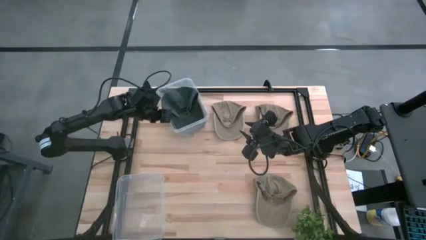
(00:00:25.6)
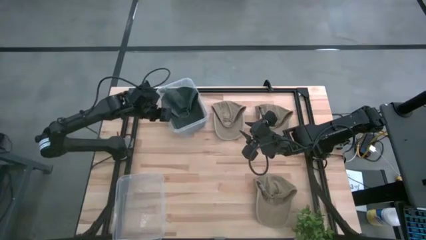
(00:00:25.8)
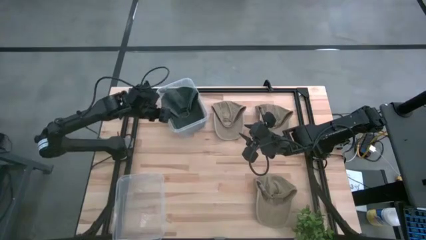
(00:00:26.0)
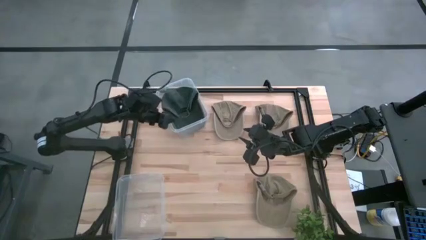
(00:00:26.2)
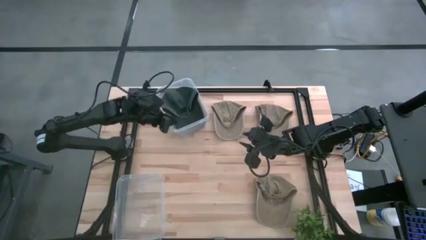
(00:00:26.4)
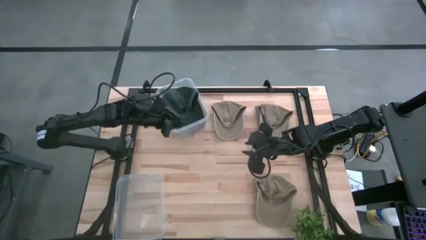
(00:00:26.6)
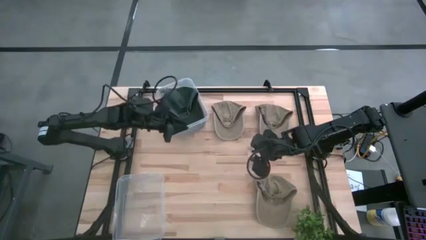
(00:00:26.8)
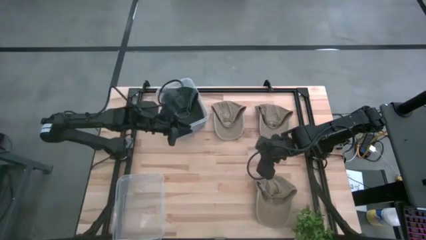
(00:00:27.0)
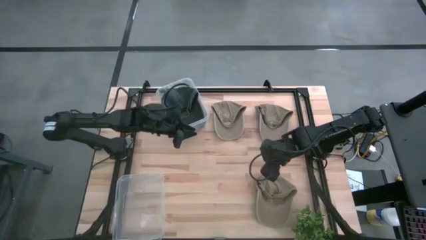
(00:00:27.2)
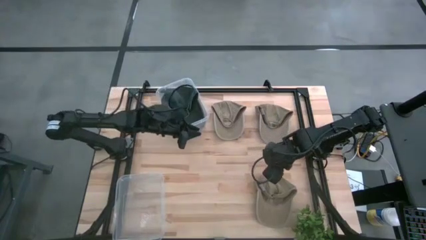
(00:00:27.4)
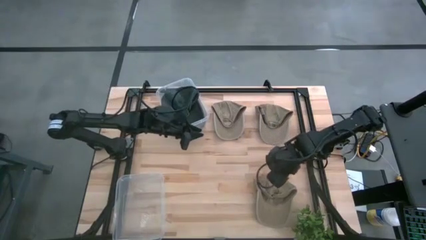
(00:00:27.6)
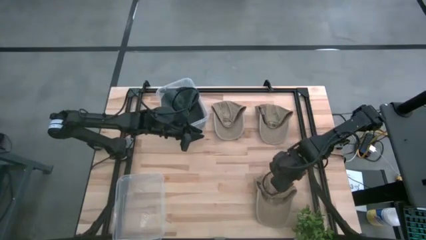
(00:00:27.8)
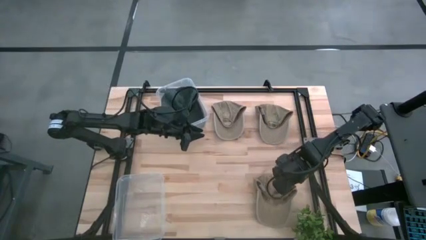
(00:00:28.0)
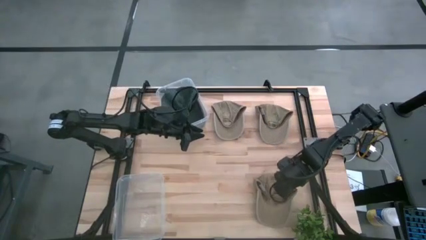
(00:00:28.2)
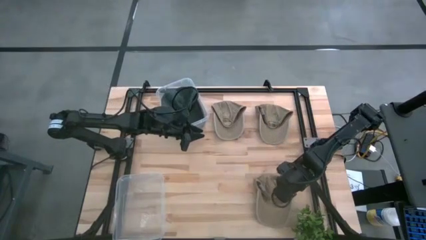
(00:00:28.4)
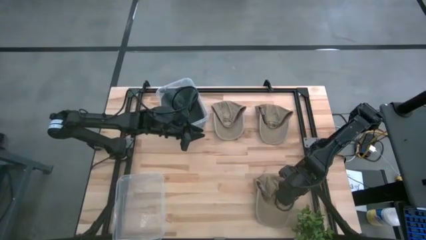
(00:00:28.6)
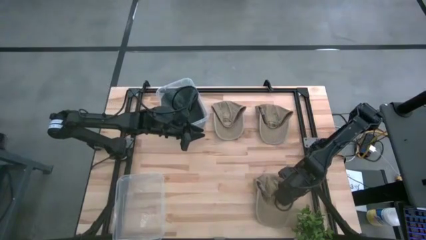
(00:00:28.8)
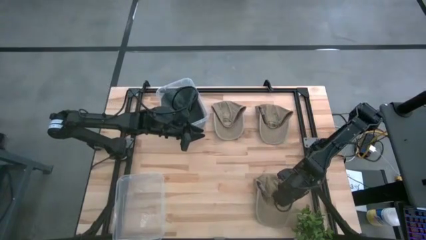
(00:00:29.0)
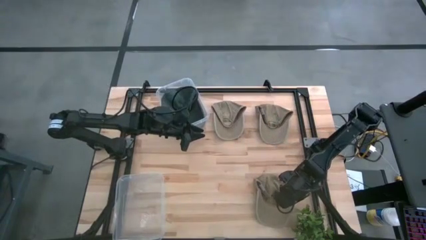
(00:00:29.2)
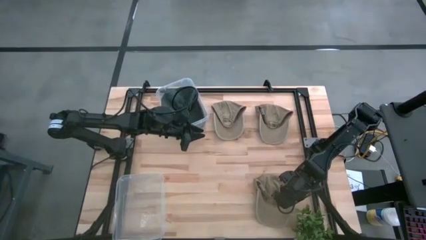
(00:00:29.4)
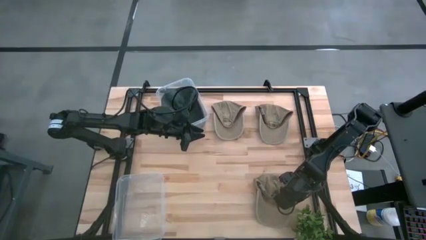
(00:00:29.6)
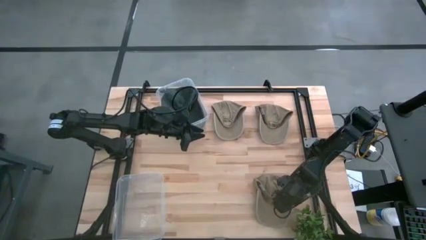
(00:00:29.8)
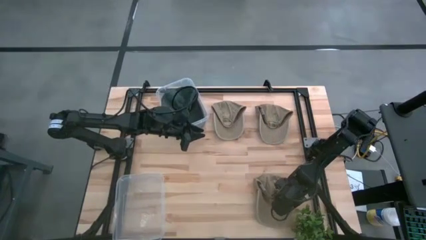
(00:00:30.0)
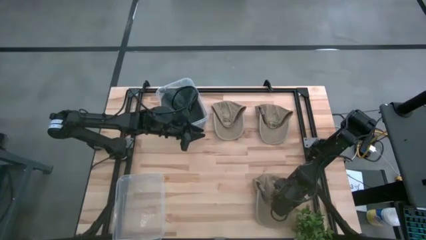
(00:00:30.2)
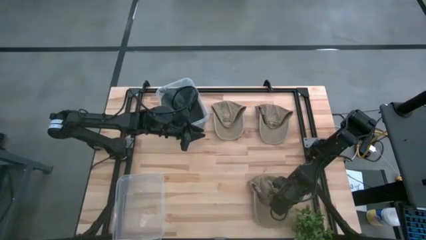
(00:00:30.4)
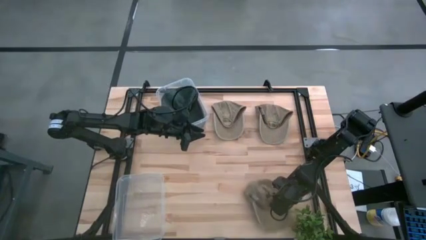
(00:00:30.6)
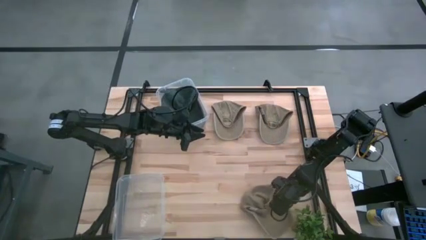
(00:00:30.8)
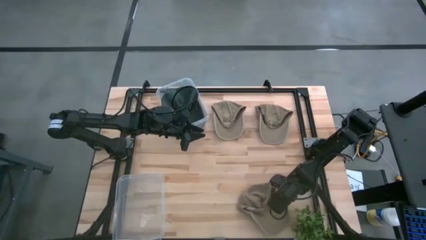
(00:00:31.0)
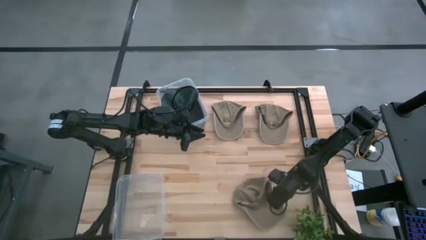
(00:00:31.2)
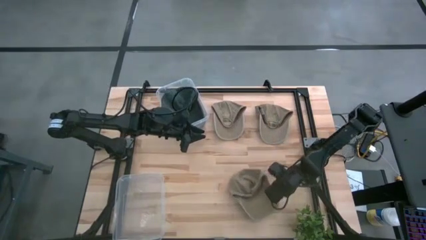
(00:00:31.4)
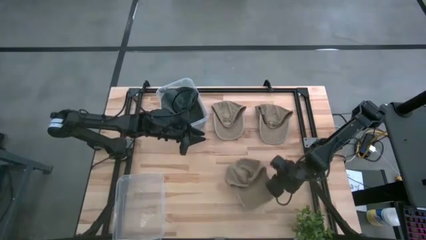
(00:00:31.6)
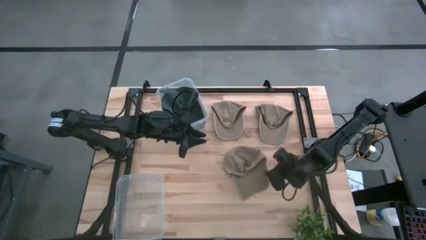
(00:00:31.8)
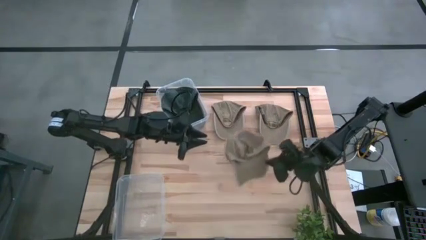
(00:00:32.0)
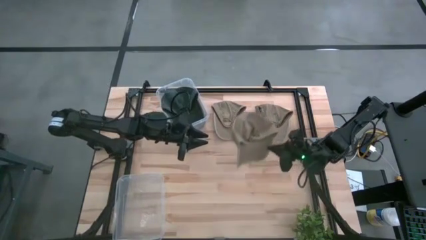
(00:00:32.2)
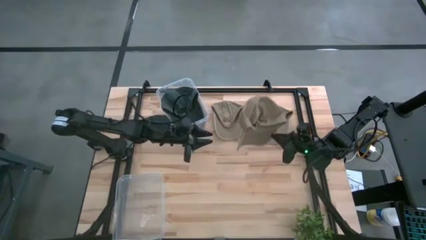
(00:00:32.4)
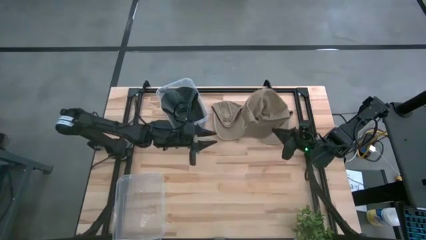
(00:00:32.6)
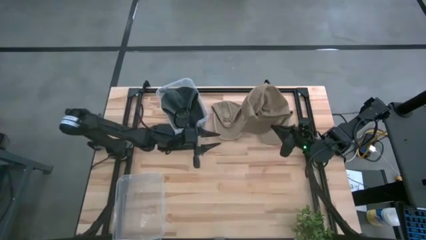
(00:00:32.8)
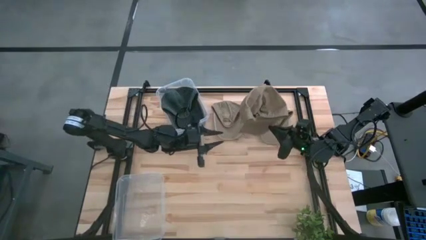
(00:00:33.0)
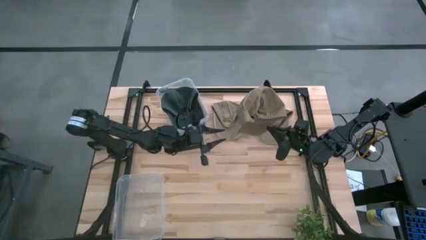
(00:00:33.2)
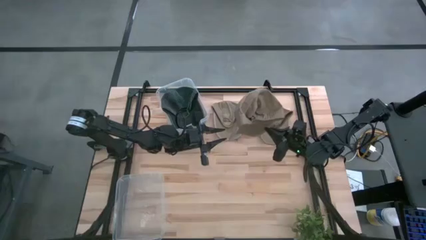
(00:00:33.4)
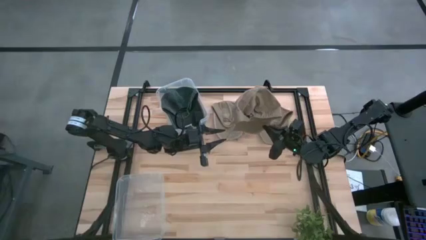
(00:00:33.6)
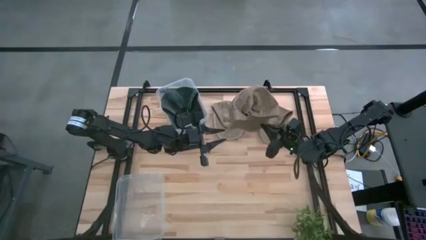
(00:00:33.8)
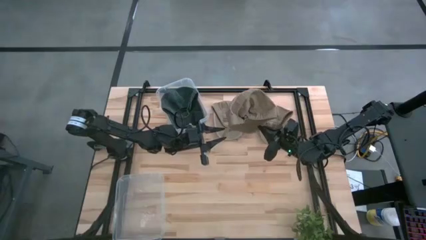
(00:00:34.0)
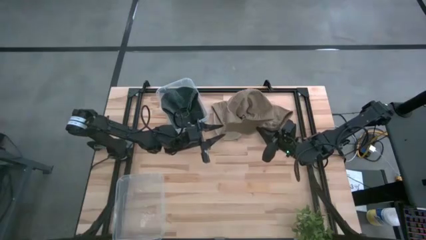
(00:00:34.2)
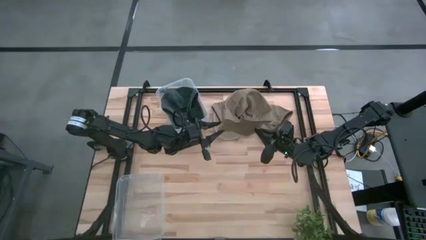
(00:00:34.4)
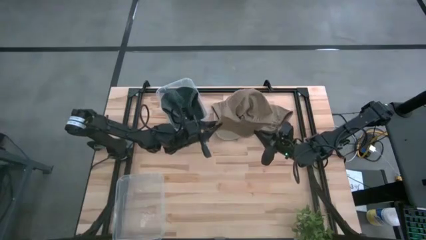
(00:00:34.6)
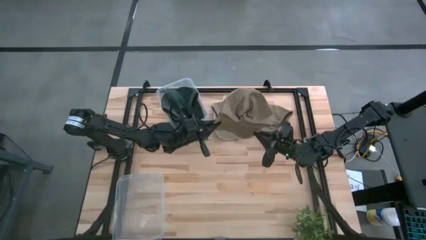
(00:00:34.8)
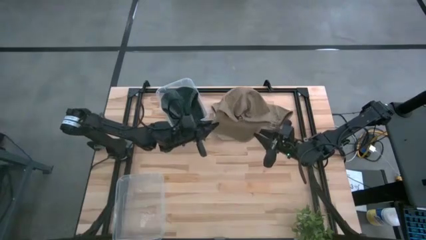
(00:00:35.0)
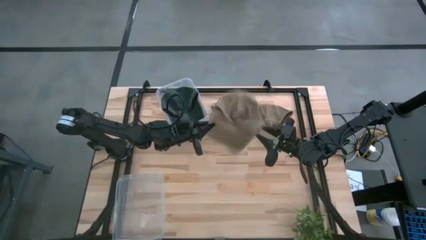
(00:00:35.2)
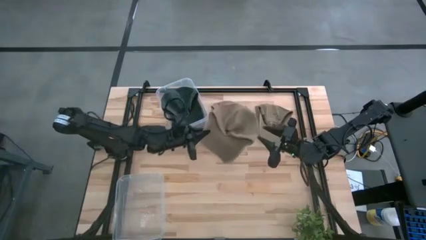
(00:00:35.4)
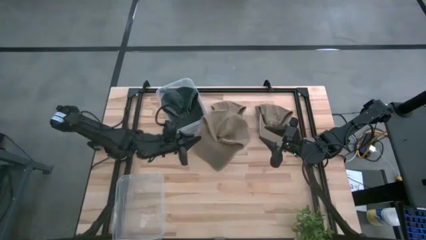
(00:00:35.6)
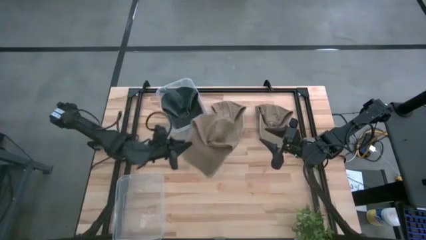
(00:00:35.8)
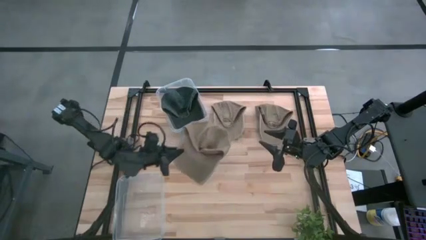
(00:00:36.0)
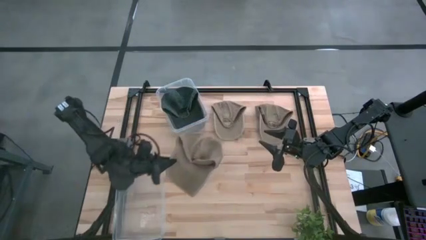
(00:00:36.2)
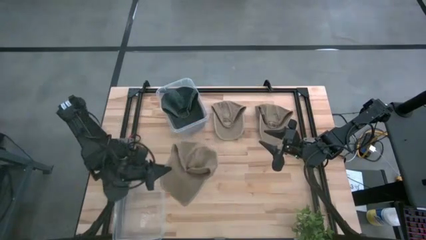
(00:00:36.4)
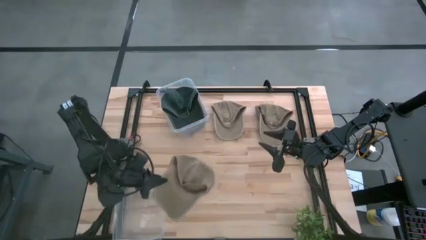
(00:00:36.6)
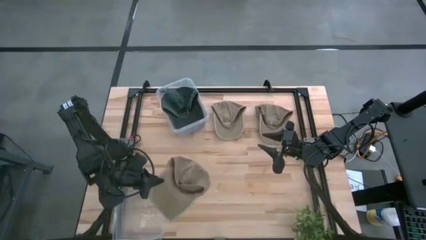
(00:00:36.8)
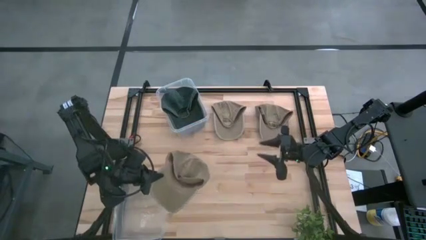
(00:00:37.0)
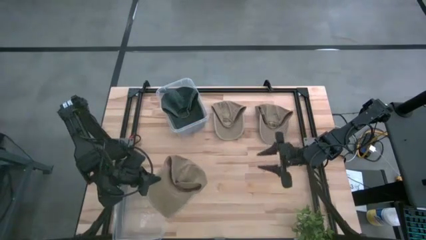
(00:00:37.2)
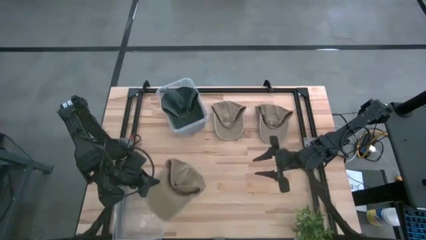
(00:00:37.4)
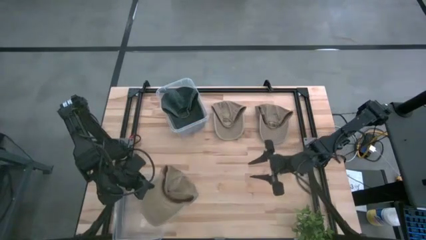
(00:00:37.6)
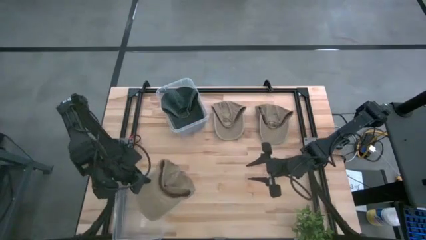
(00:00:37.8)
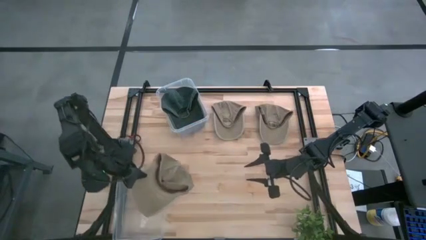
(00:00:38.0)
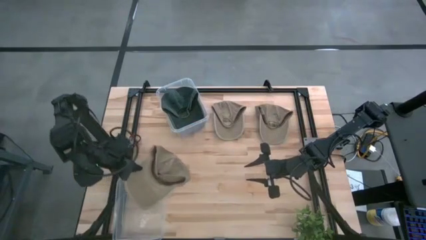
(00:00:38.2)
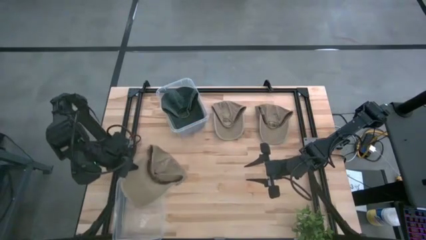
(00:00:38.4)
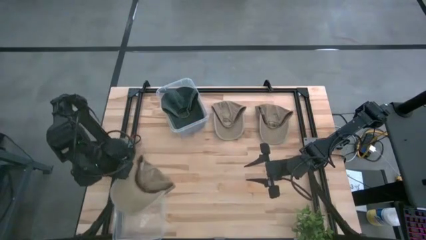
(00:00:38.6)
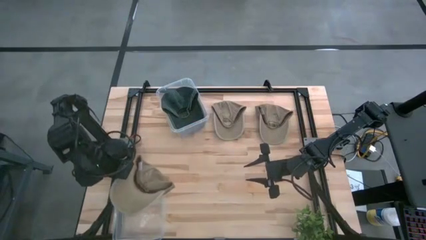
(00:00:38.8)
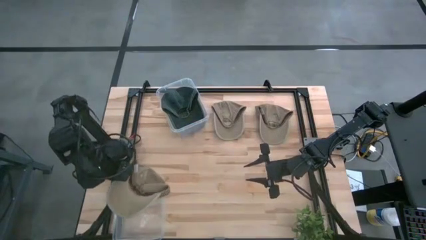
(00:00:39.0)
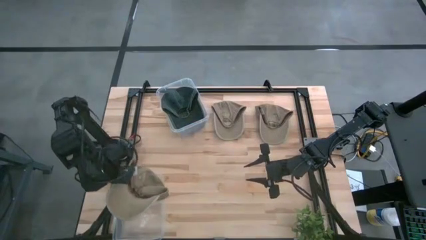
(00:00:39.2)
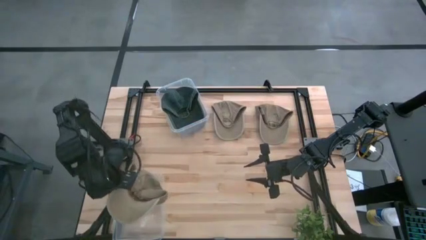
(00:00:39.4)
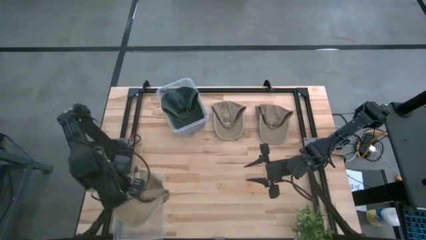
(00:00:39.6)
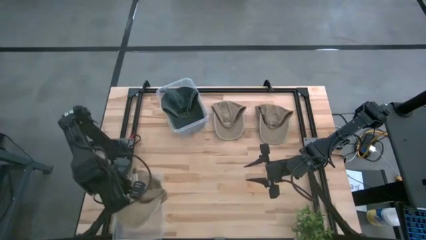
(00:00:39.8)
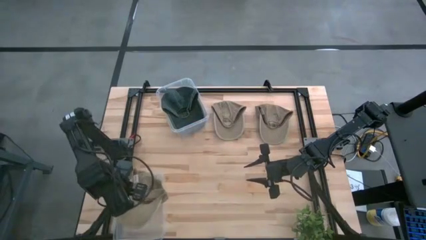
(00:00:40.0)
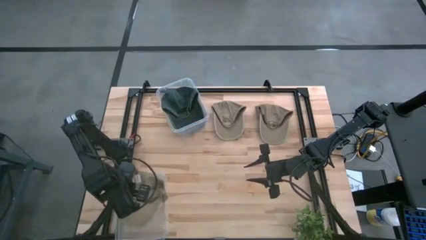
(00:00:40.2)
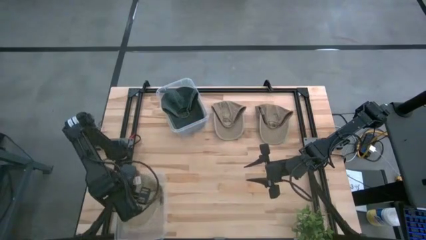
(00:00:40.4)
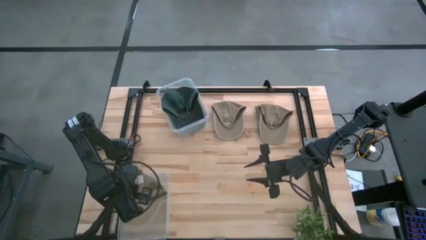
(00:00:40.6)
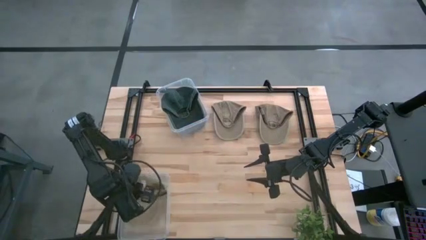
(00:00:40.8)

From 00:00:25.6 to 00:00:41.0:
Task: Pick & Place hat
Put the bottom right brown cap into the bottom transparent bin
